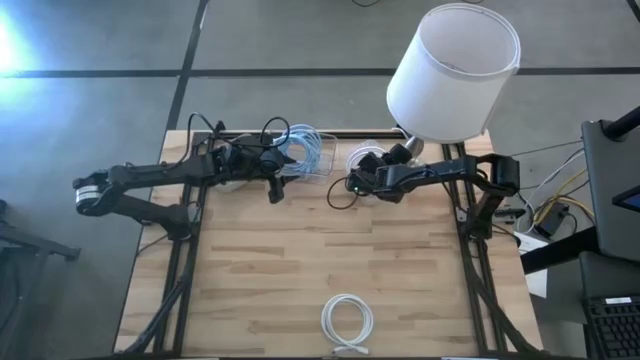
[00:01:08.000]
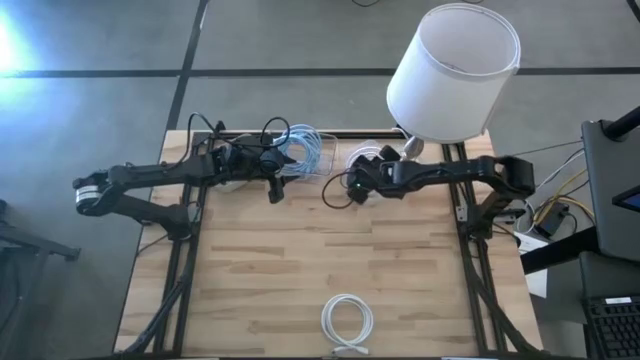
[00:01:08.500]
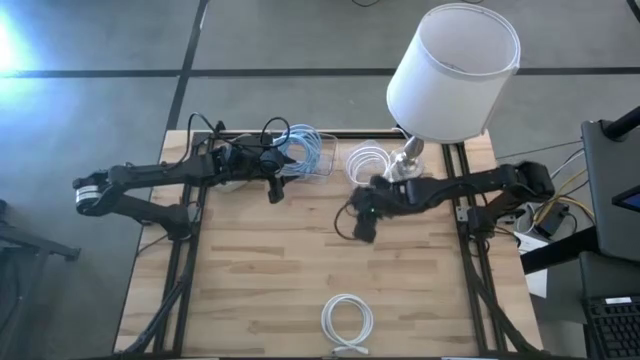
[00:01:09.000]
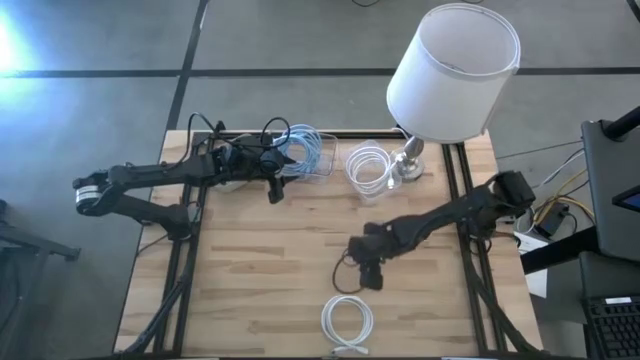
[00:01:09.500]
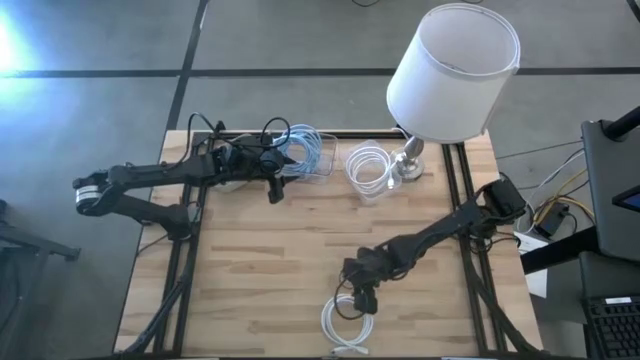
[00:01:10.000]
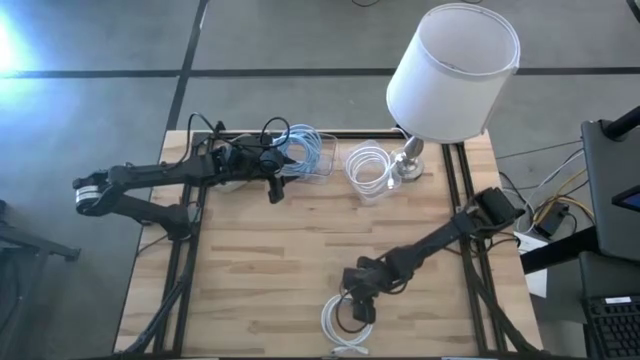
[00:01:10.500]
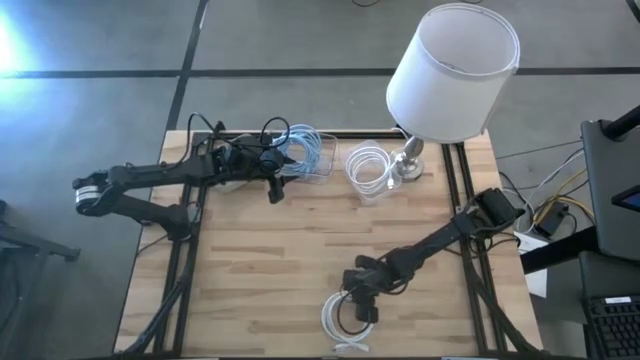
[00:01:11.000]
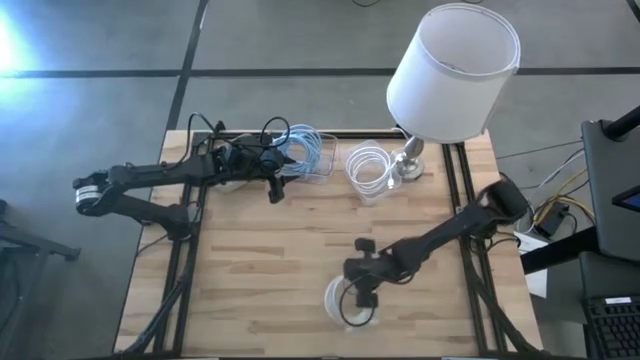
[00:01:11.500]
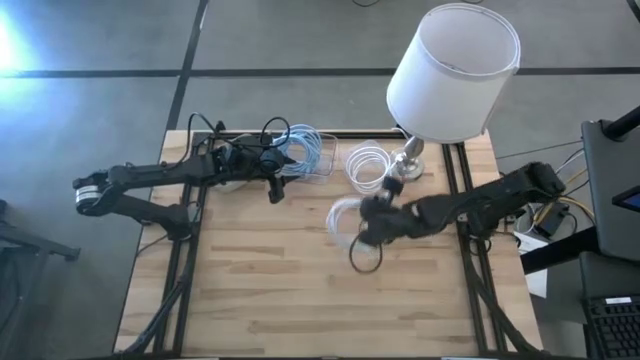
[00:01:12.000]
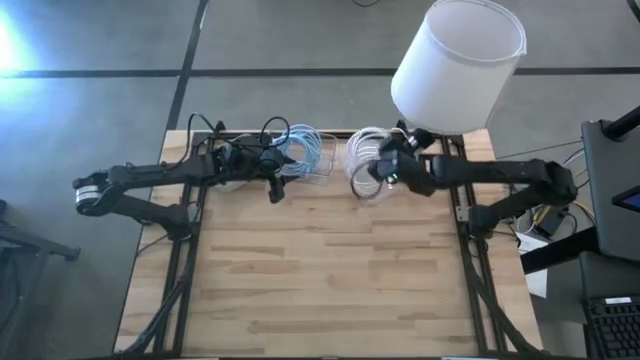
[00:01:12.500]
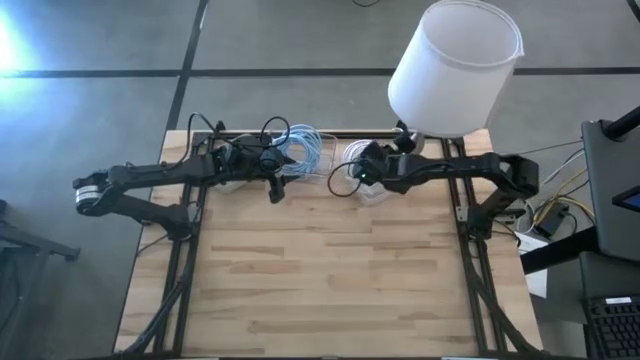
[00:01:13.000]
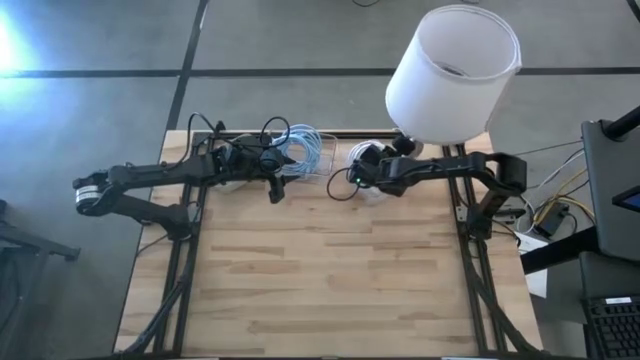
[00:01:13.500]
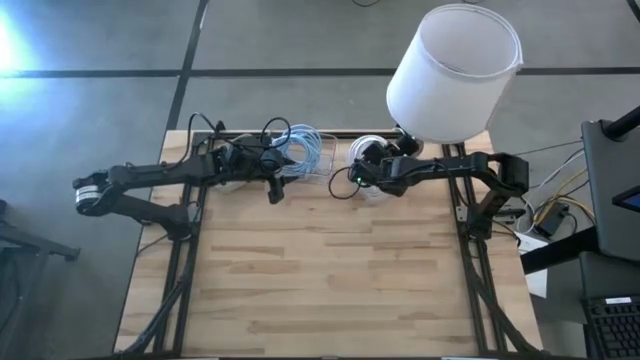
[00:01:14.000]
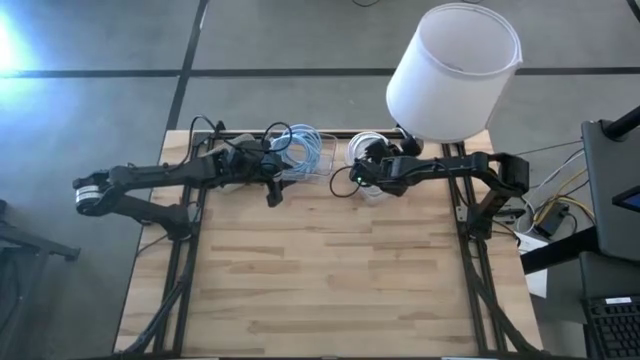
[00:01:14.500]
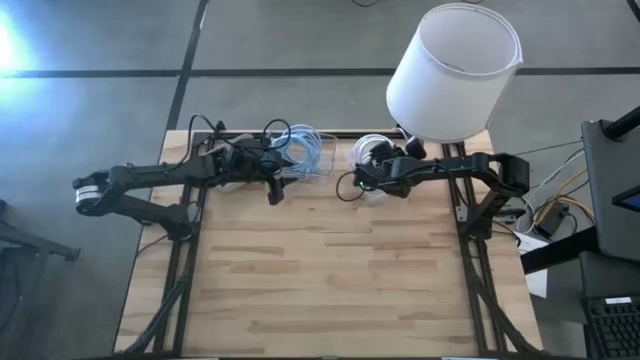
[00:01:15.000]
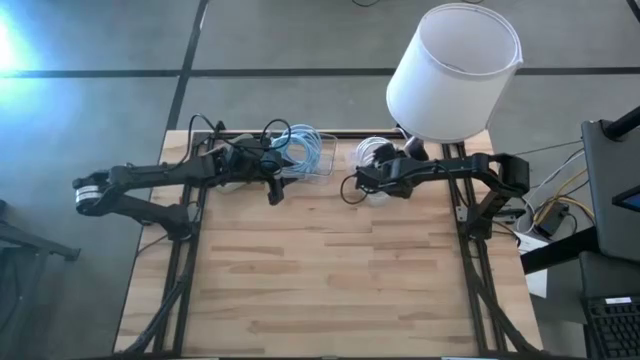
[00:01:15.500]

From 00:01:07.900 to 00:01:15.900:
Task: Pick & Place USB Port
Put the white HDMI cable into the white bin

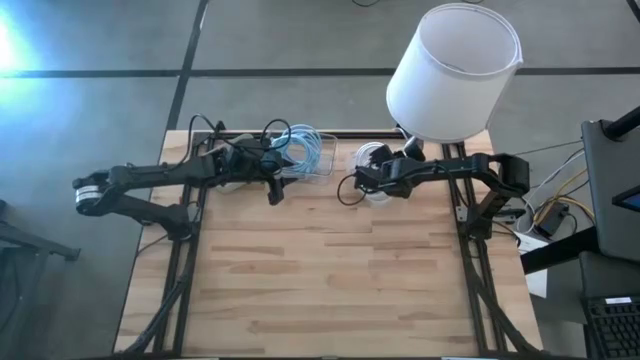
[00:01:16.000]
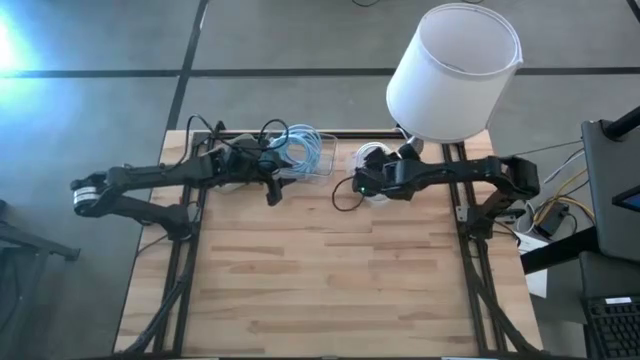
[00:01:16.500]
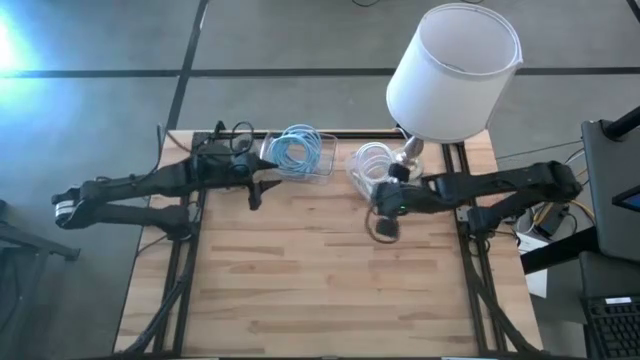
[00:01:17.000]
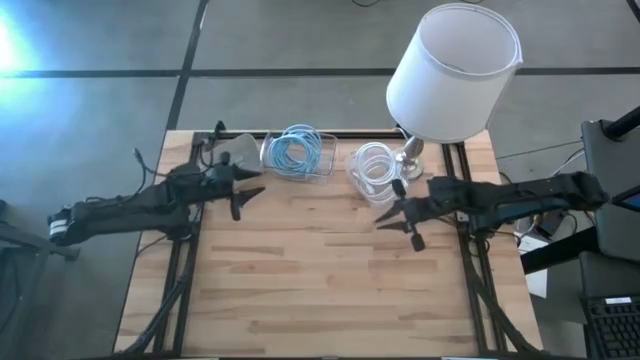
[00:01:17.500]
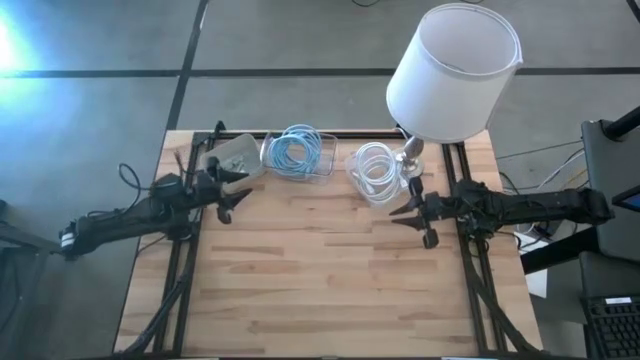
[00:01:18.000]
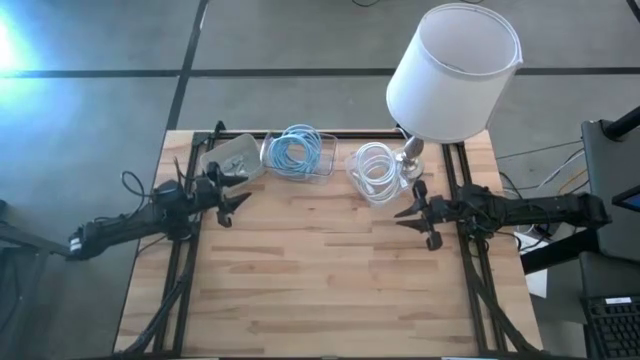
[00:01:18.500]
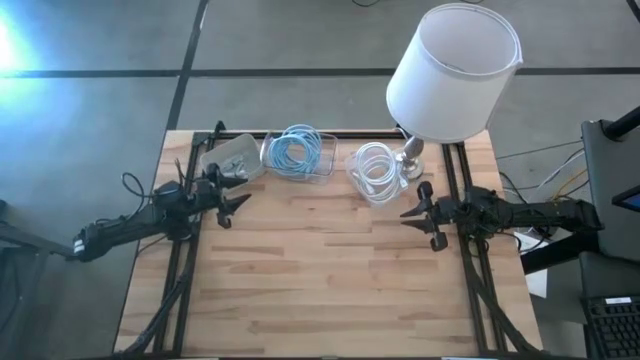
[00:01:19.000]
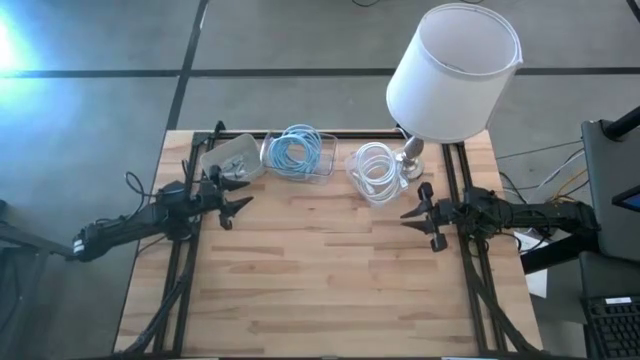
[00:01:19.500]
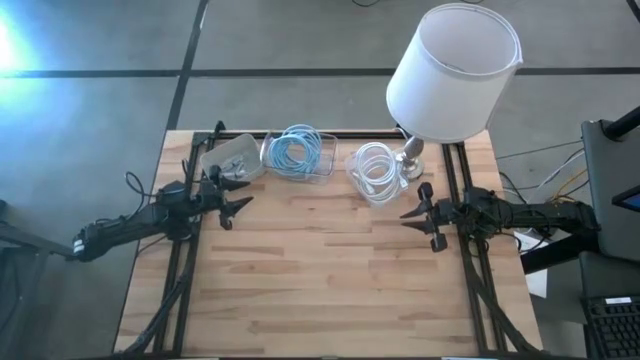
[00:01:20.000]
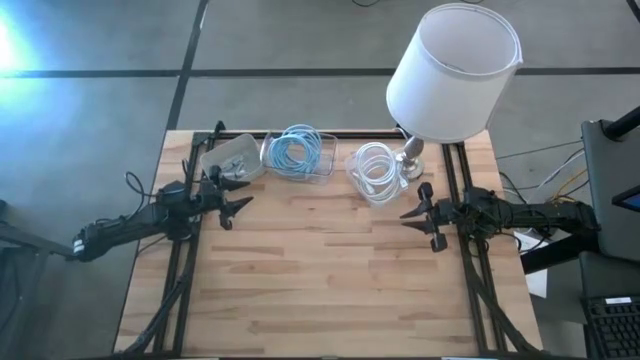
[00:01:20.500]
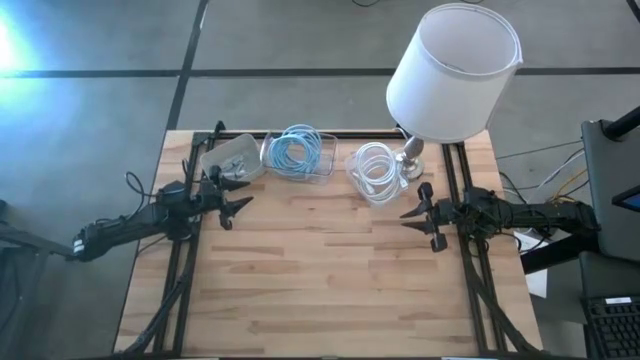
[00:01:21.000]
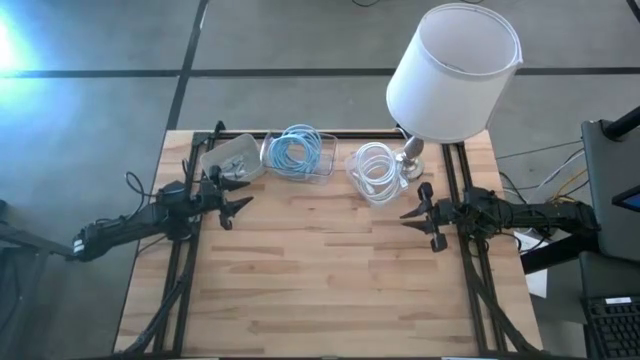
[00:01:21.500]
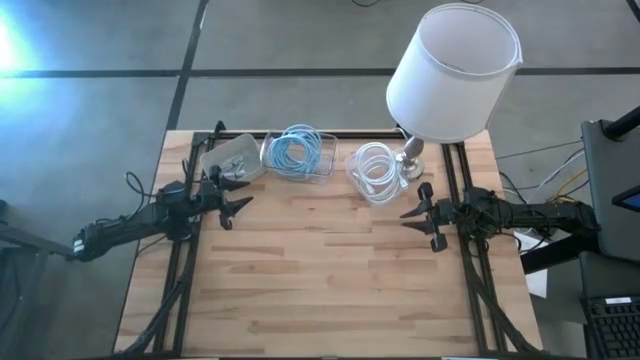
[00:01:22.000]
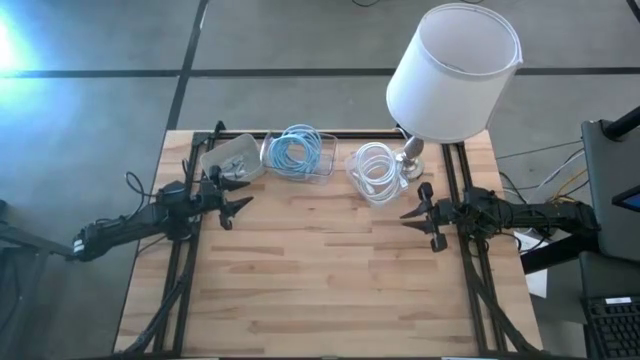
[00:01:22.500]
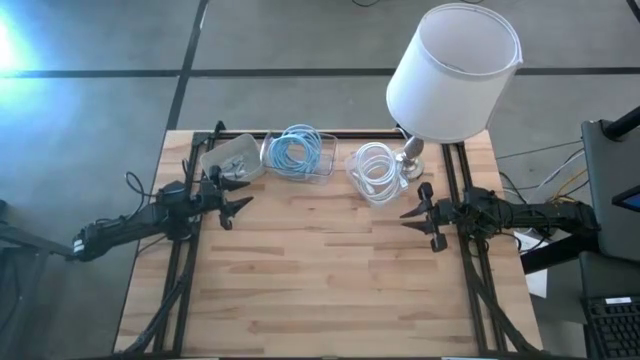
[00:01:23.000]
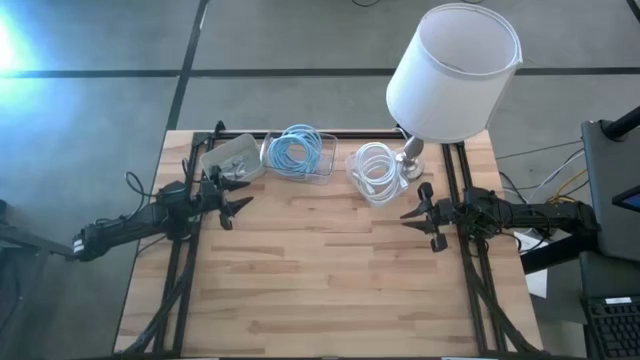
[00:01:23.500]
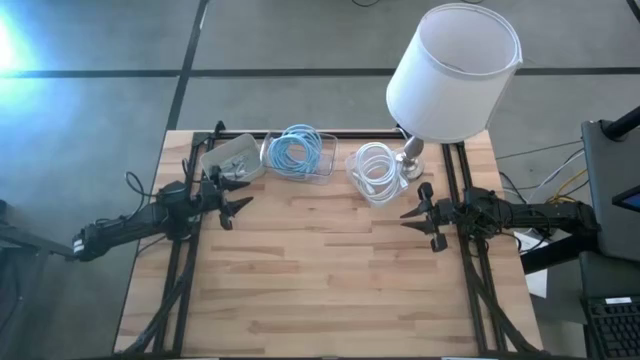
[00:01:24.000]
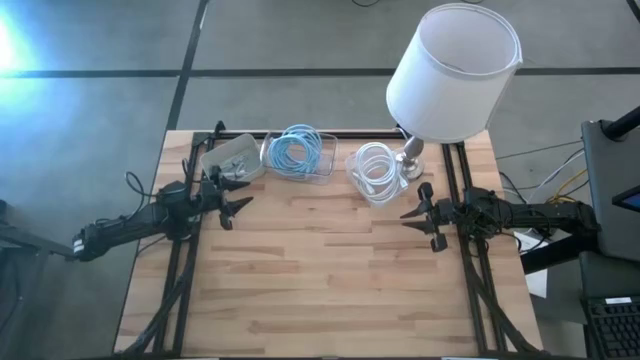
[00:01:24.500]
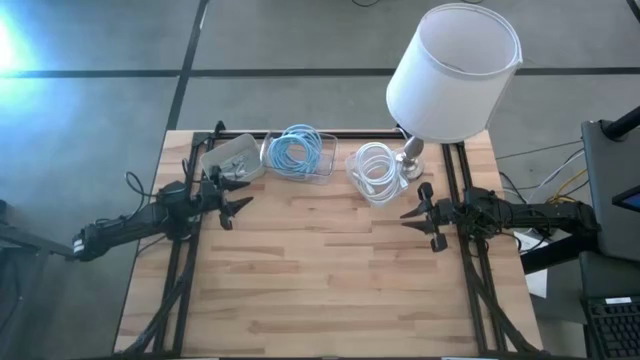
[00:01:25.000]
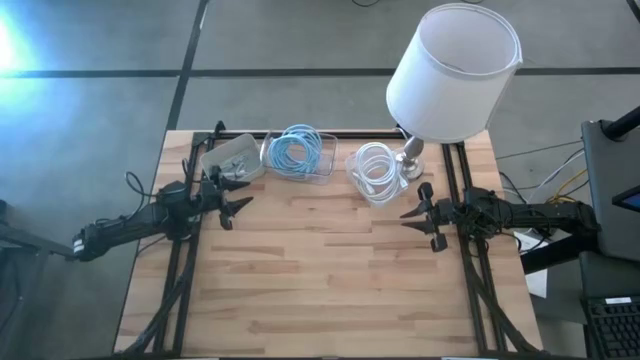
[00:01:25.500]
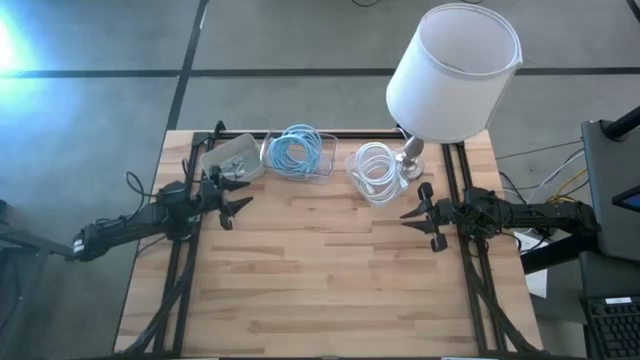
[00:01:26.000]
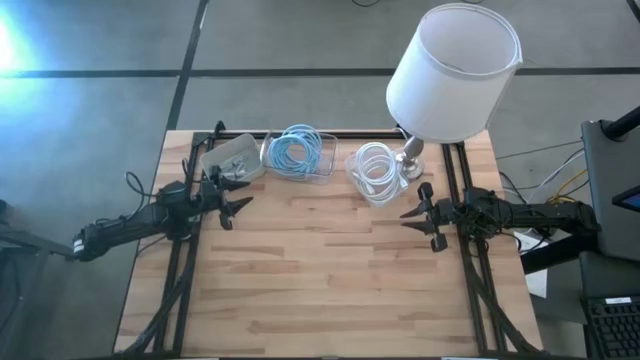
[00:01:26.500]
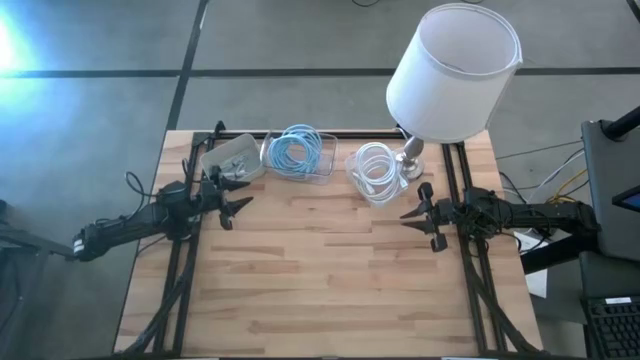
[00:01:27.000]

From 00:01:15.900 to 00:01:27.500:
Return to Home Position
